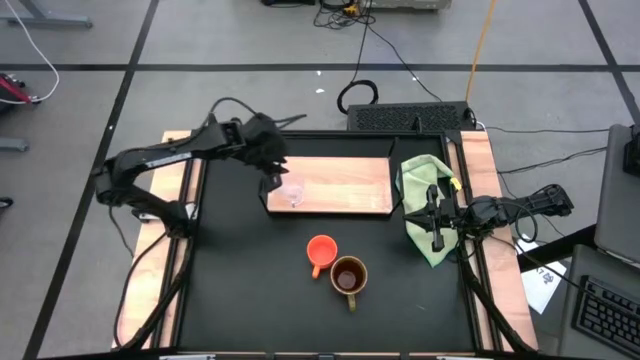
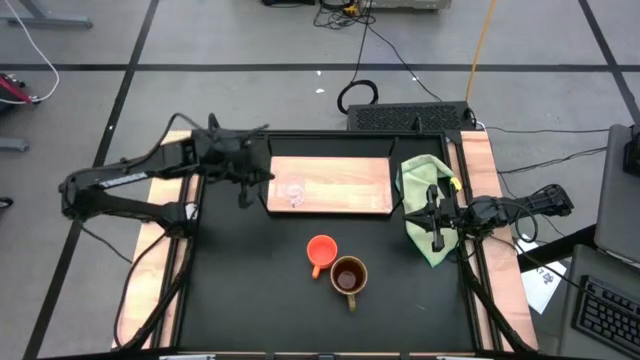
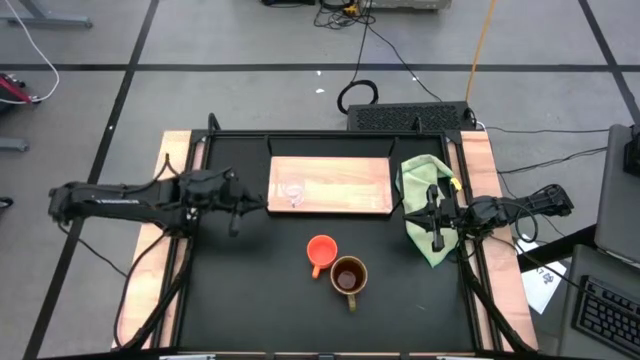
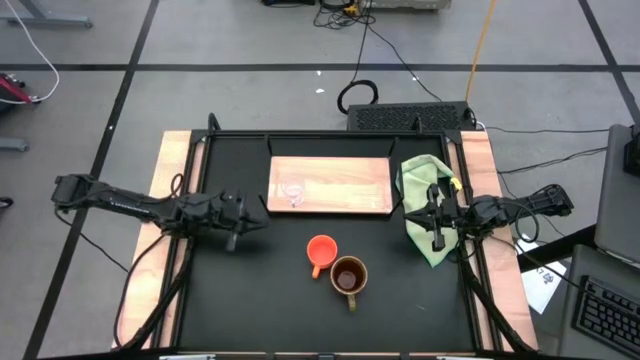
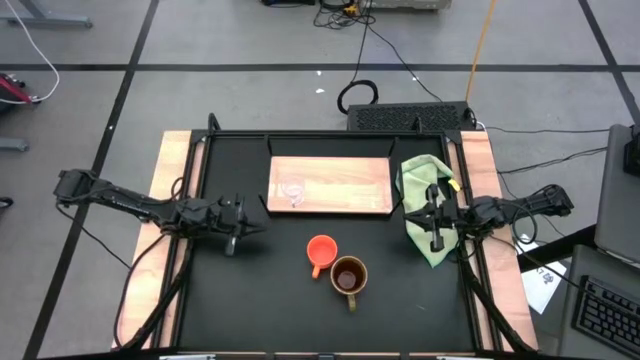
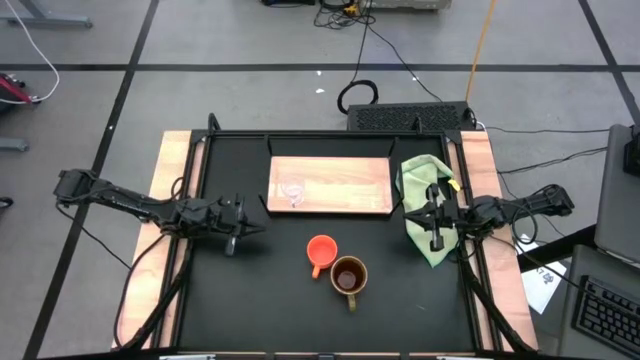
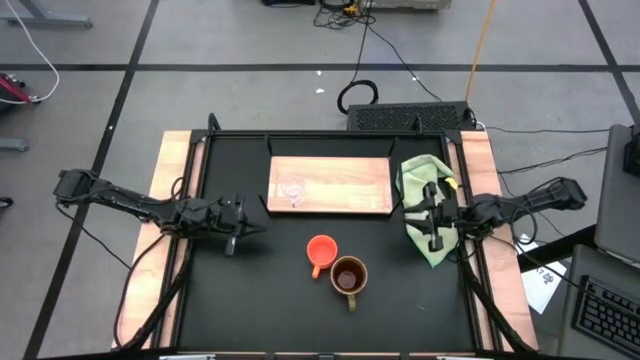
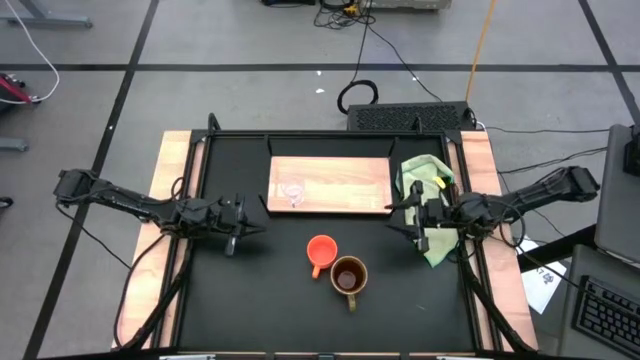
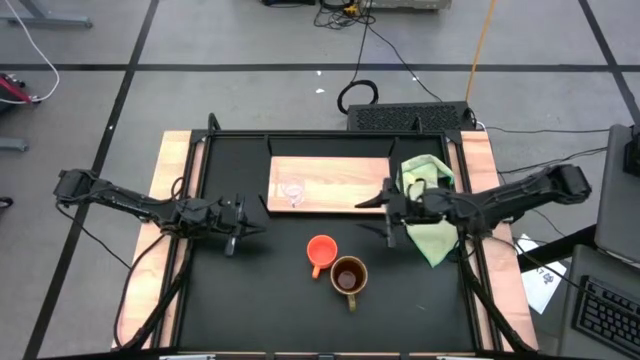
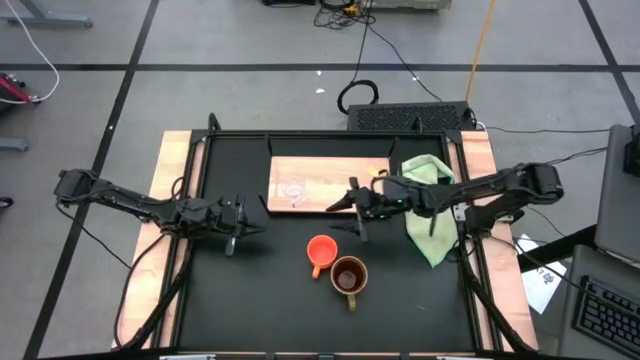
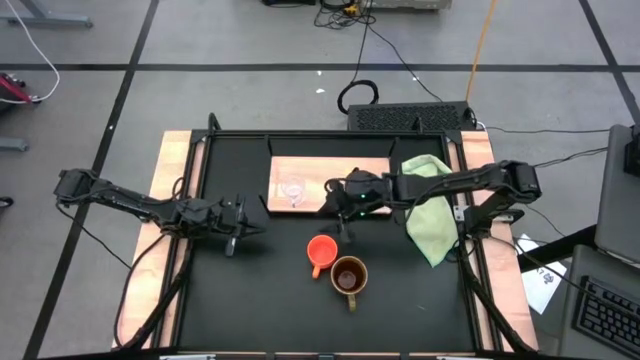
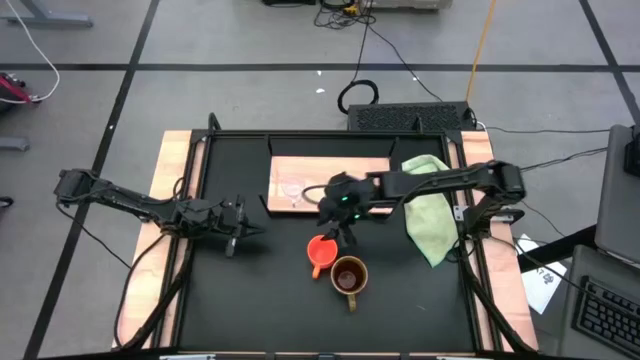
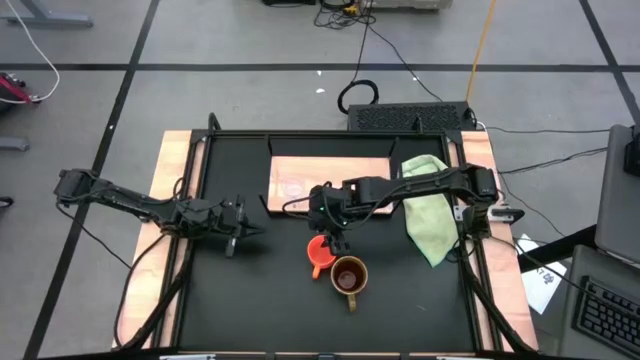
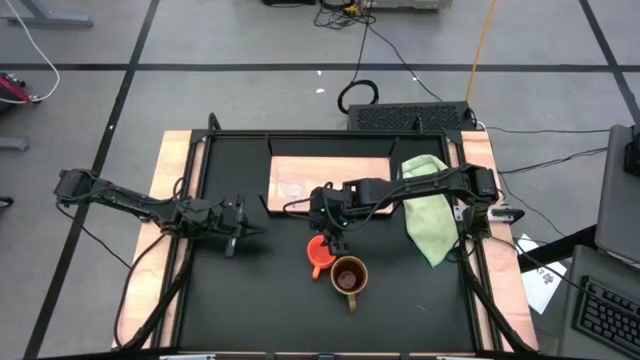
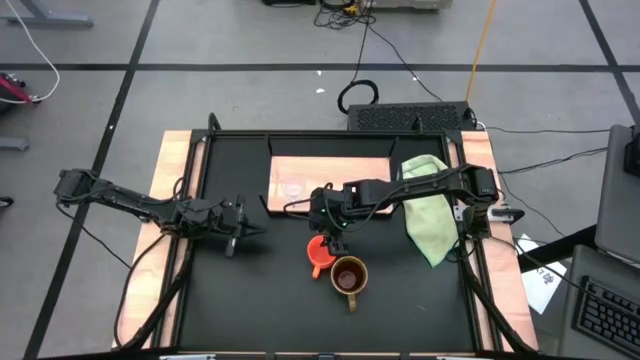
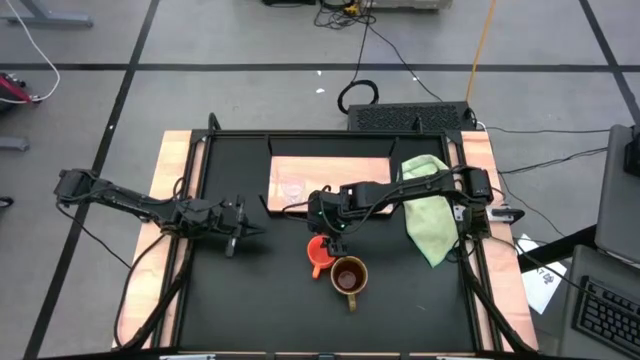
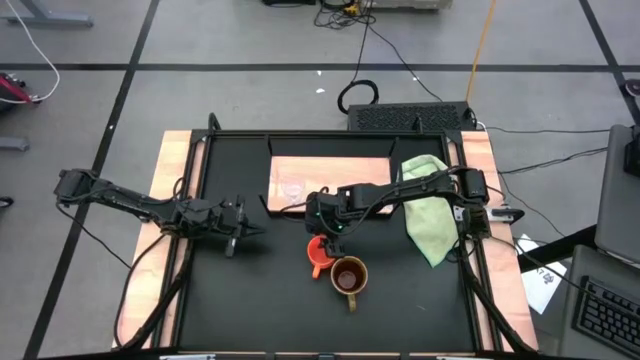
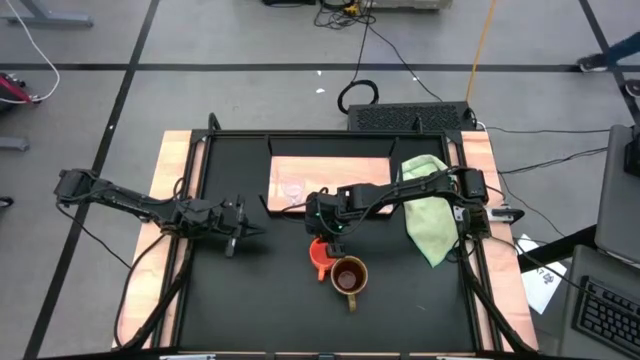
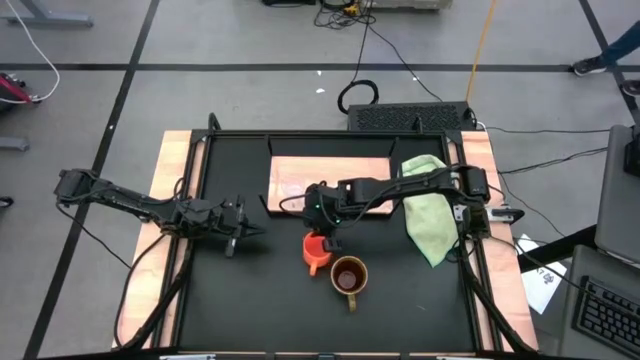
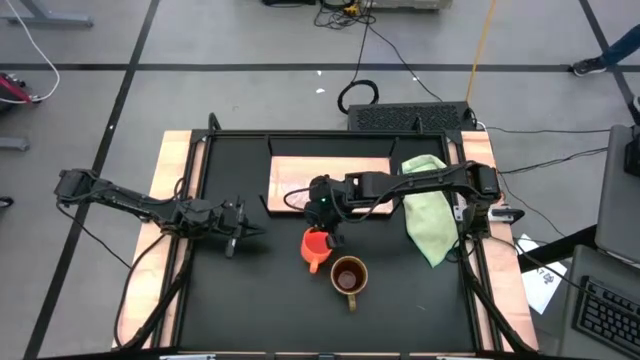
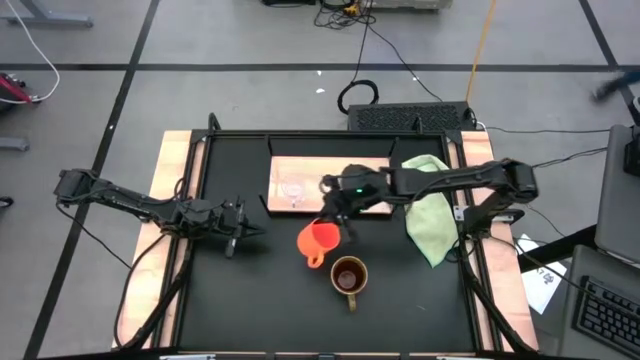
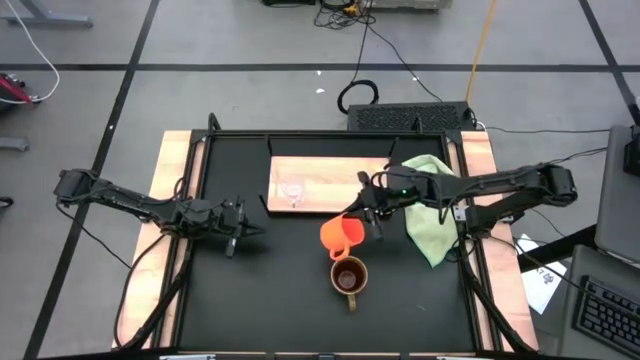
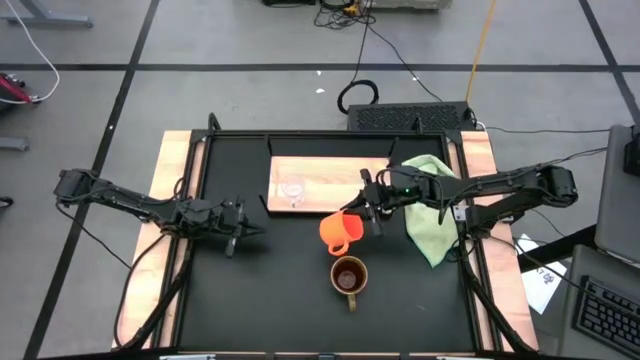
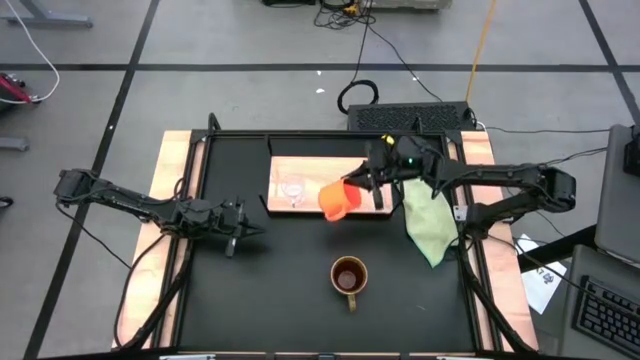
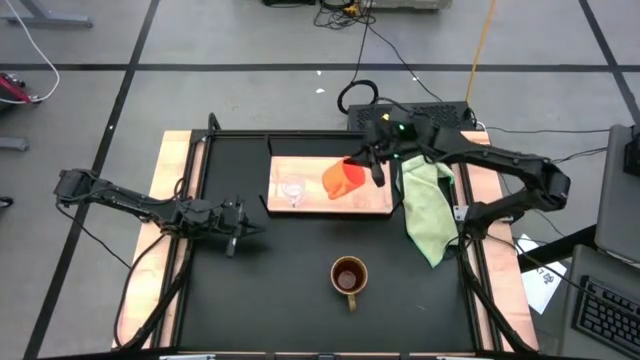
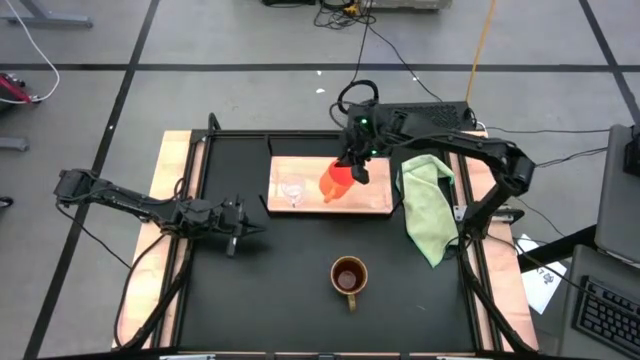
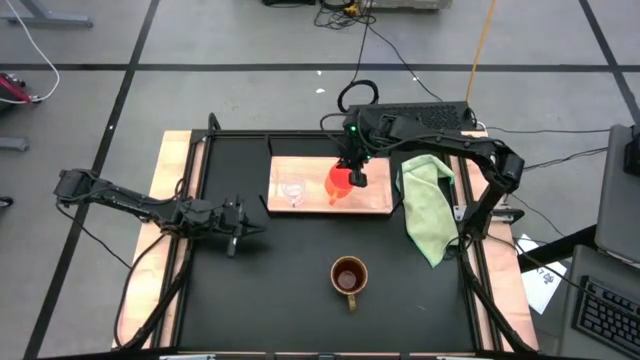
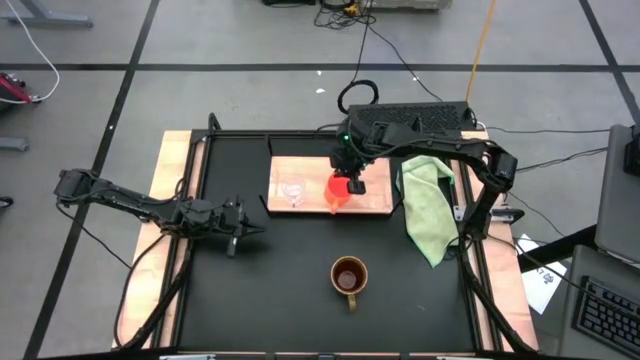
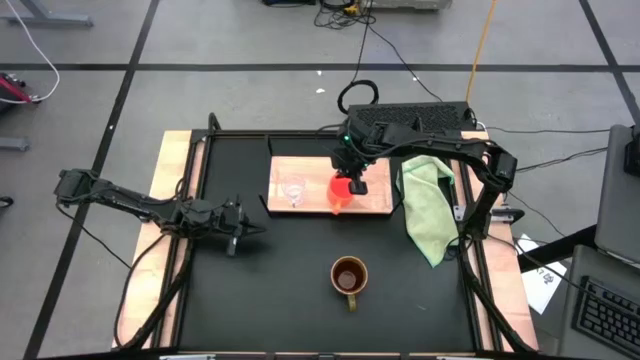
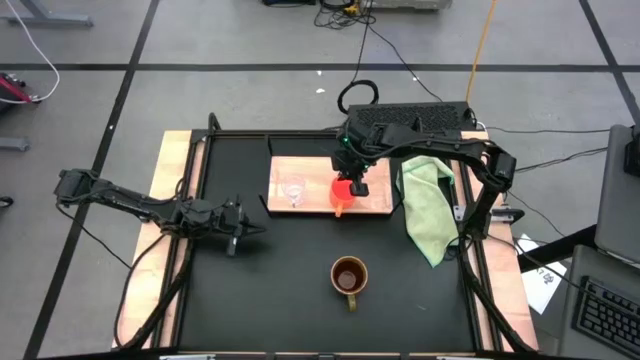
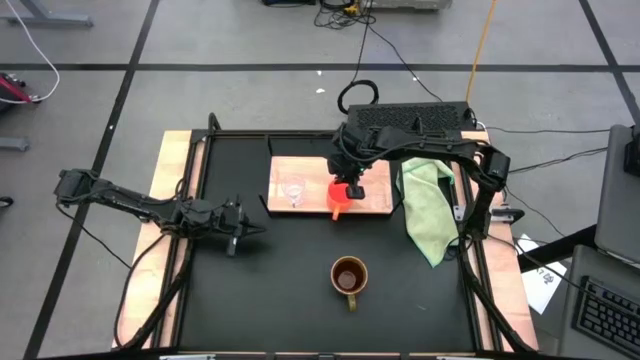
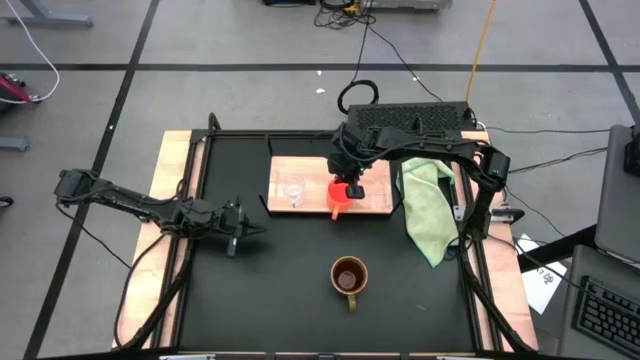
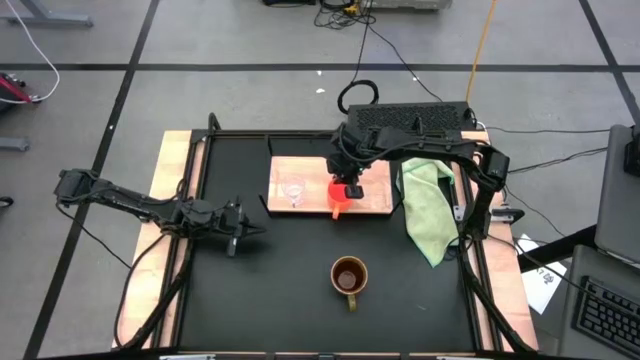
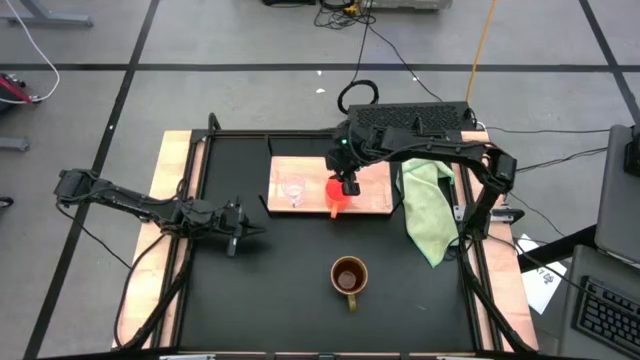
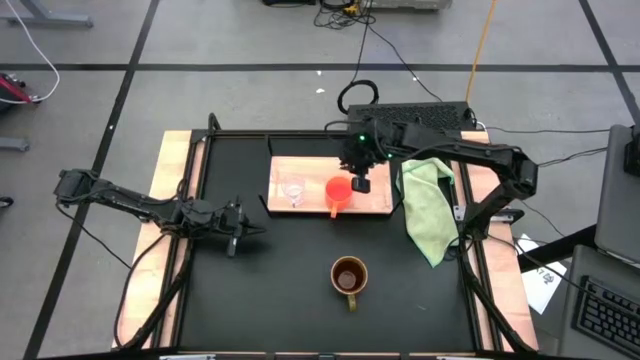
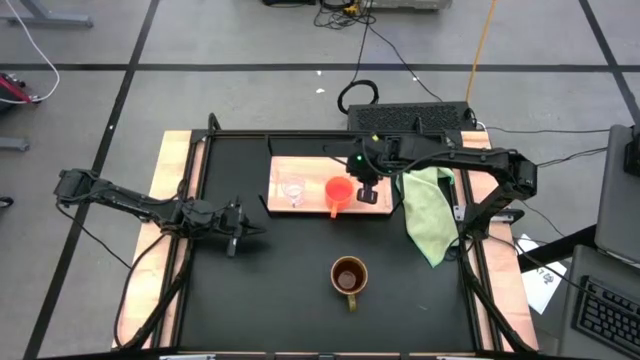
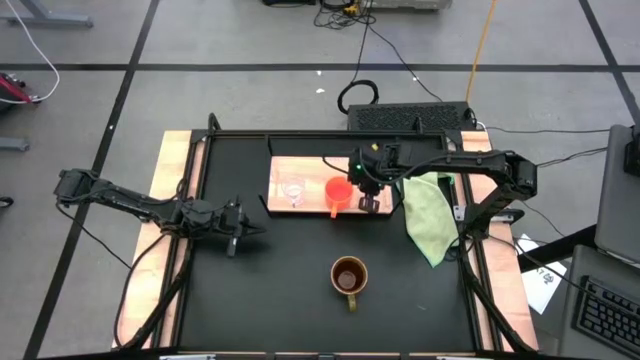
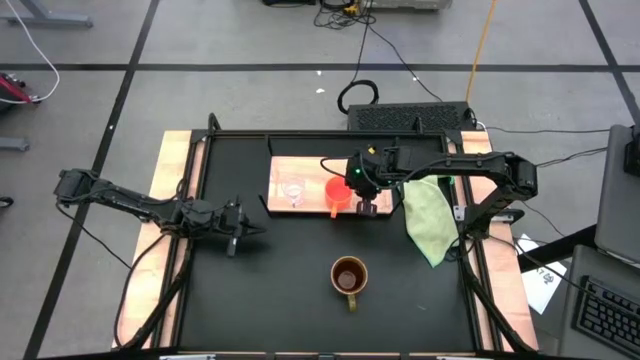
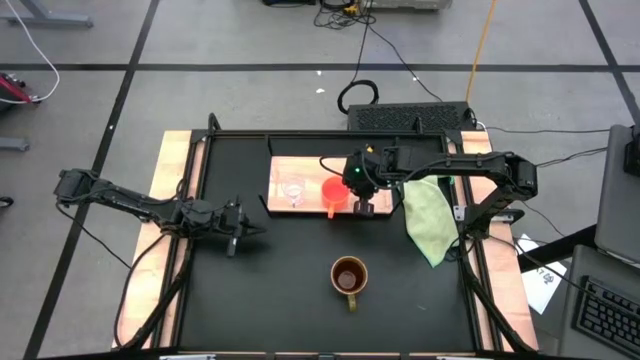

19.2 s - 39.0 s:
Task: Stack small to large cups/mugs on shelf
Put the orange mug on the shelf
